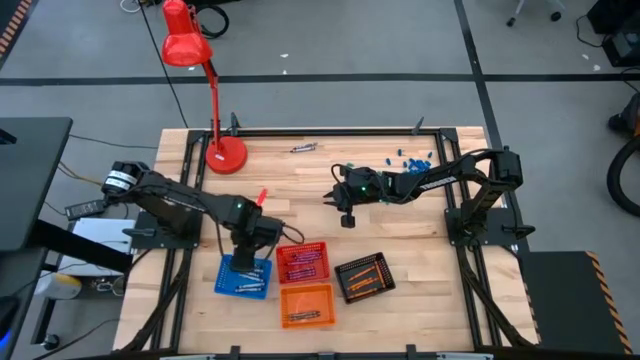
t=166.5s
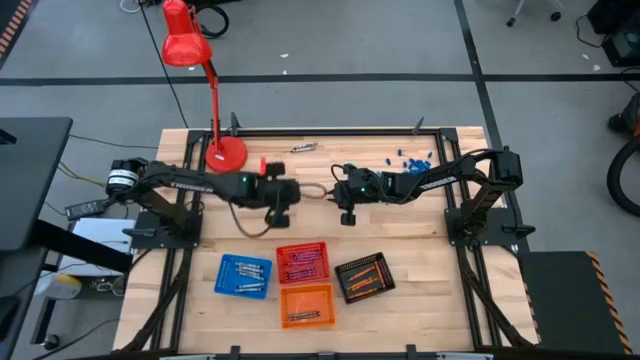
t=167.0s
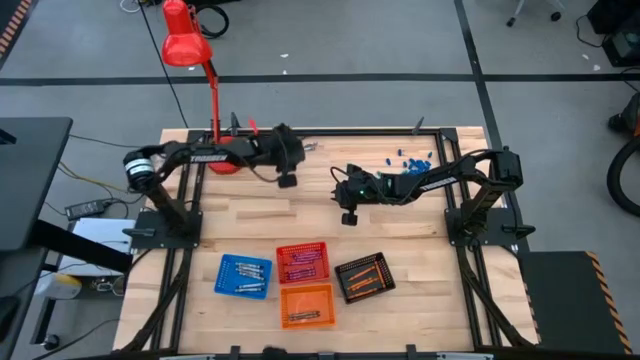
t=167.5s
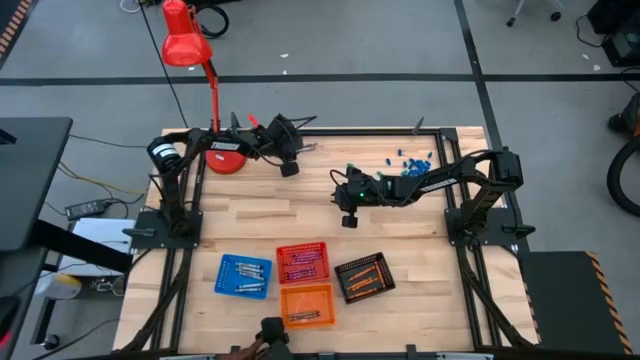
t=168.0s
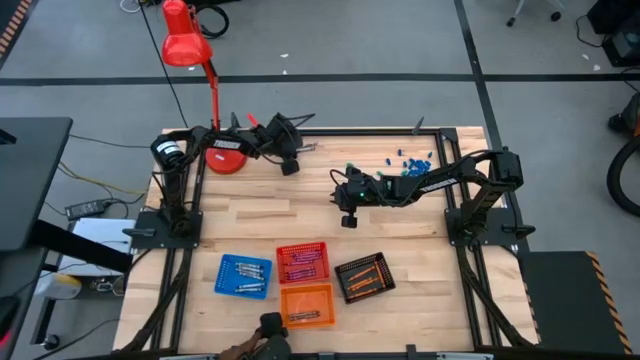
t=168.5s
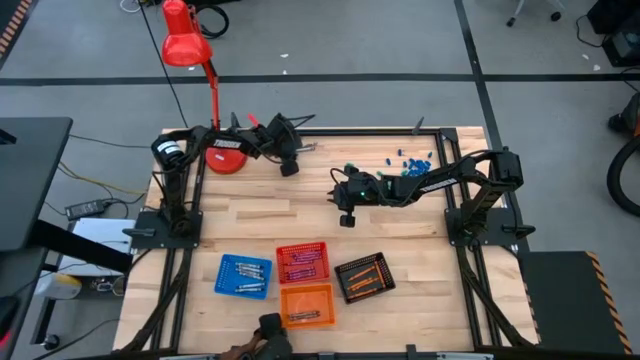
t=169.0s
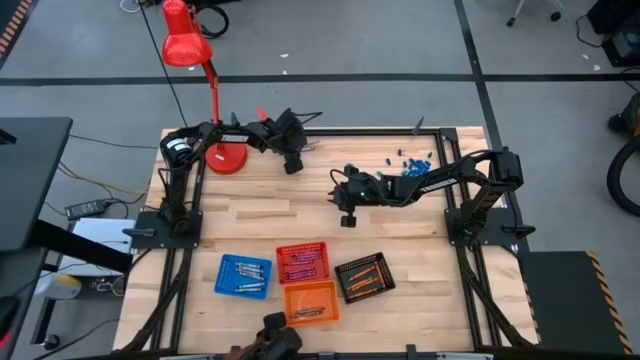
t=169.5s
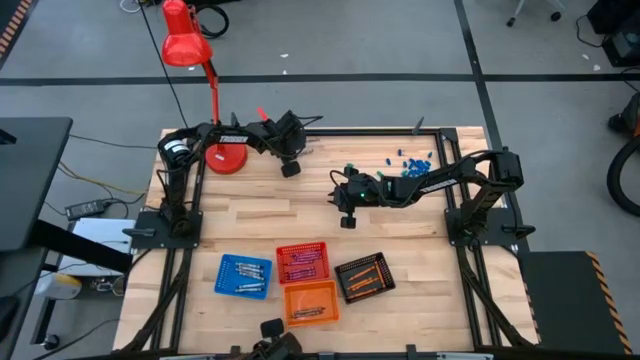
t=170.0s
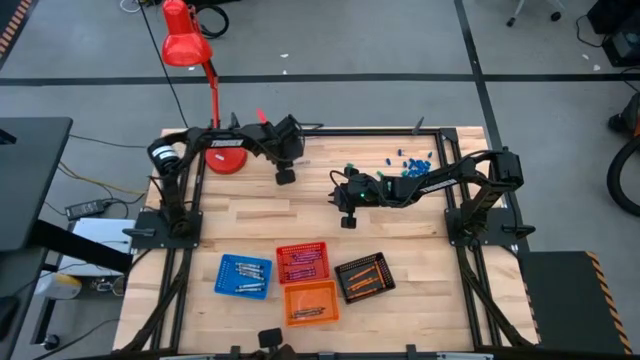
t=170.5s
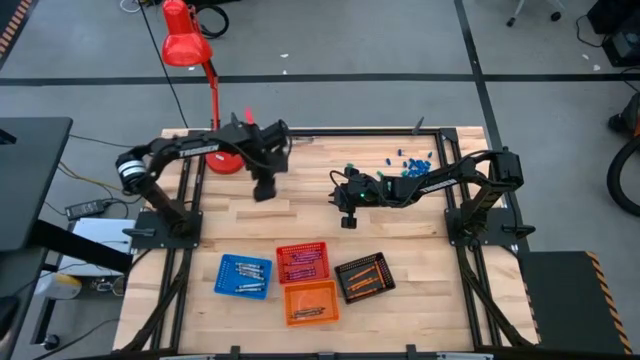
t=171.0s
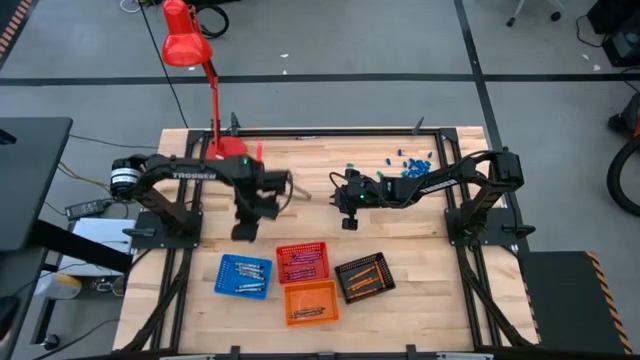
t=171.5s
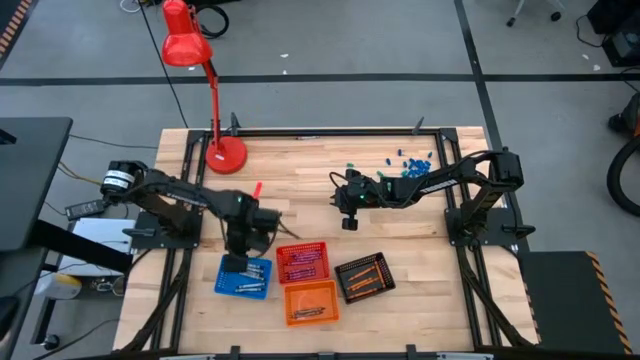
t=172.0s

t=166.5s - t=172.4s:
Task: Sort crayons
Put the black crayon into the blue bin

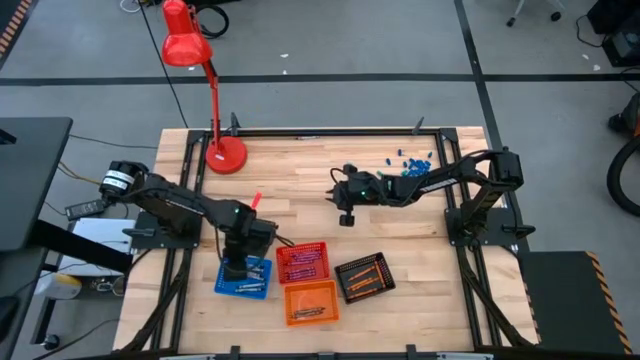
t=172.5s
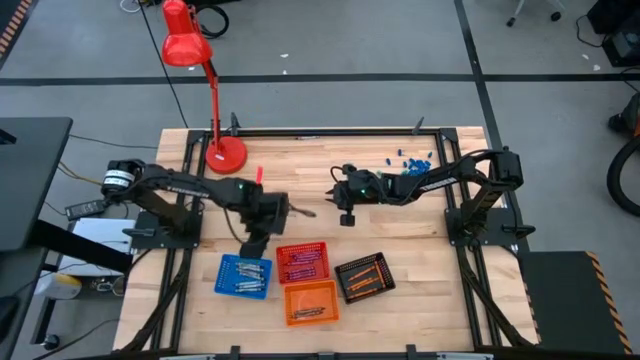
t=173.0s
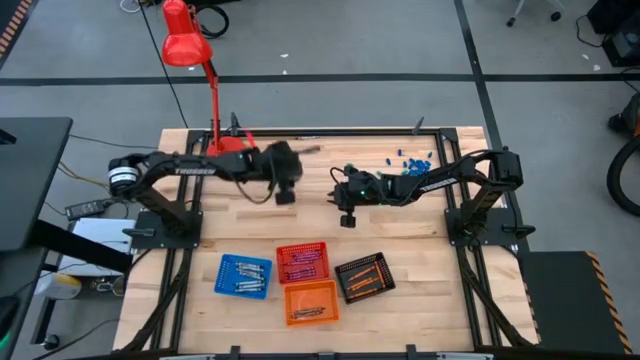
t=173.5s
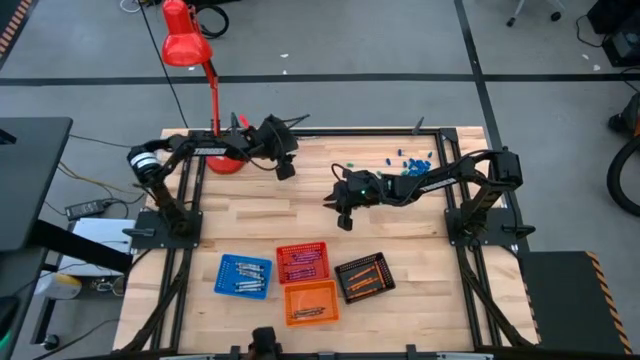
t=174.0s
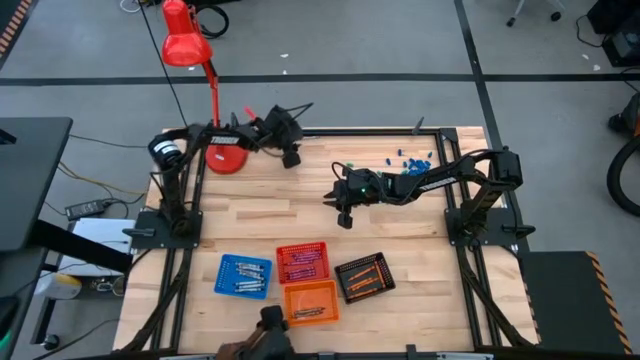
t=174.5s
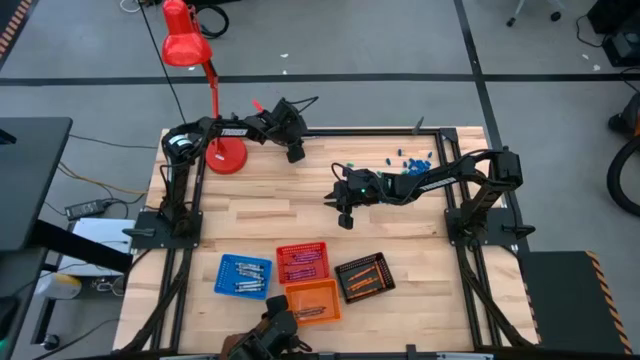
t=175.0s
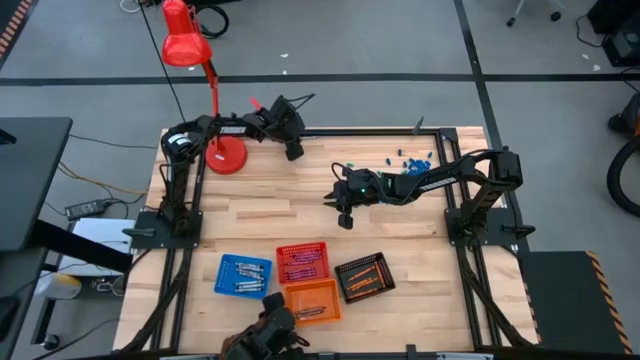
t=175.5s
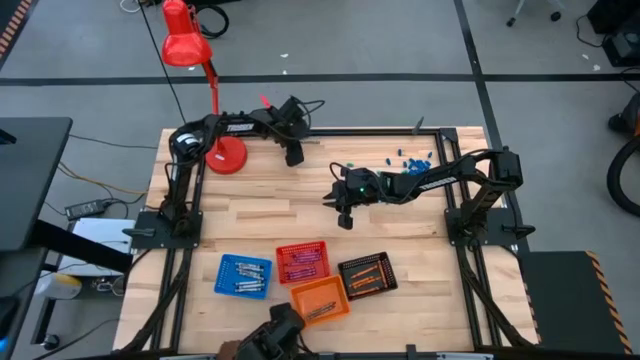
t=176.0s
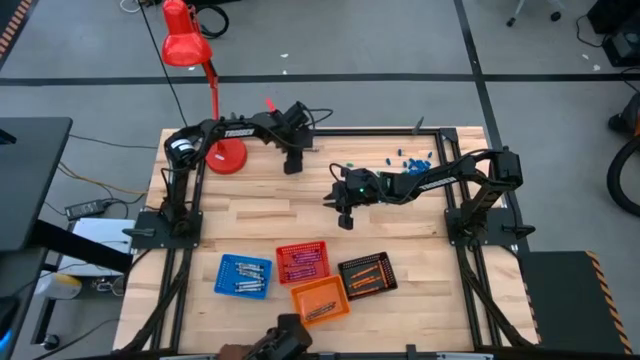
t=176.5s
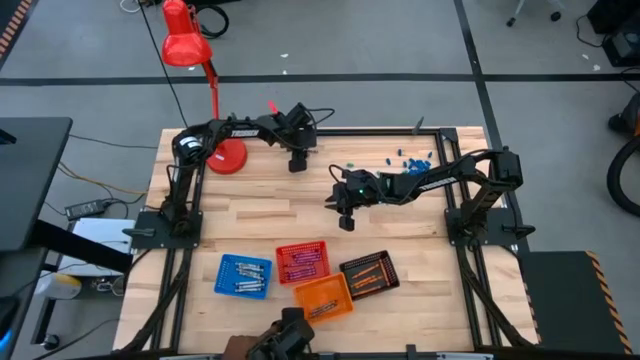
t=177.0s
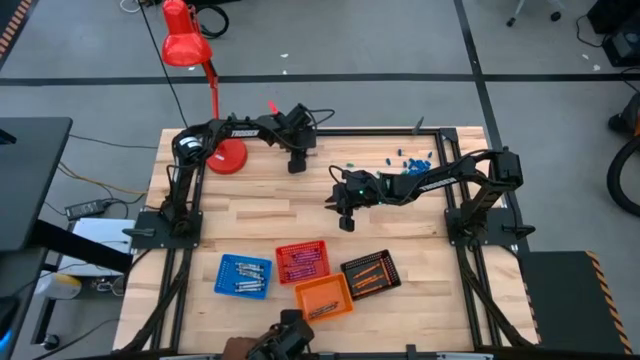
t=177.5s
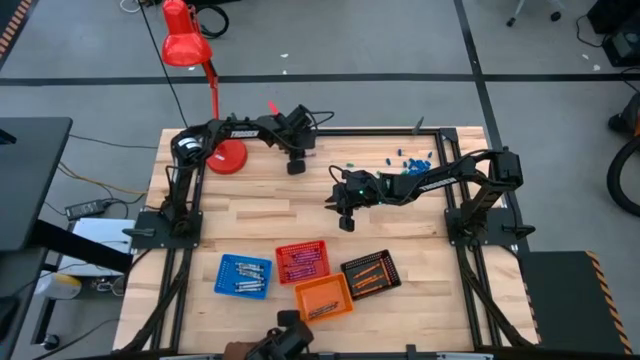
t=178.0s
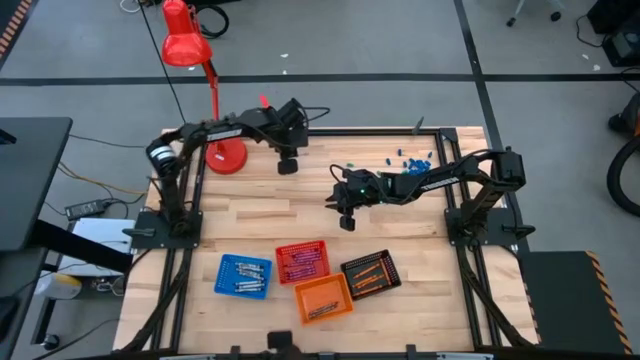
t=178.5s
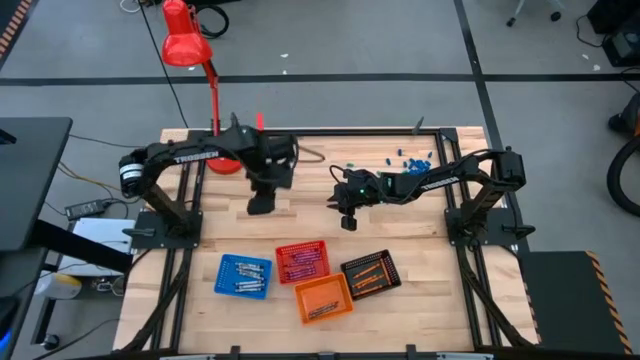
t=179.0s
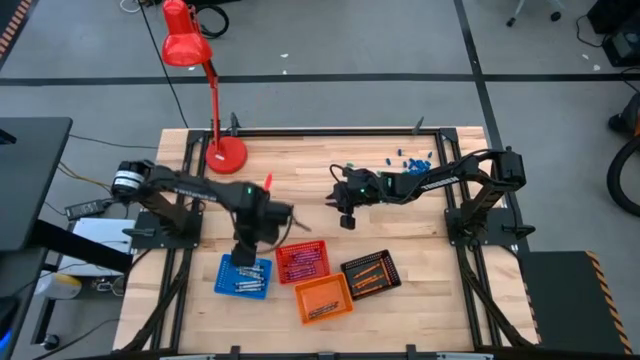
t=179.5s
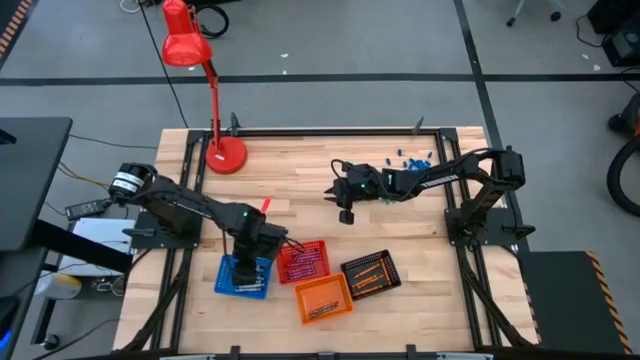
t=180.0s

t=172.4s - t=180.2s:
Put the black crayon into the blue bin

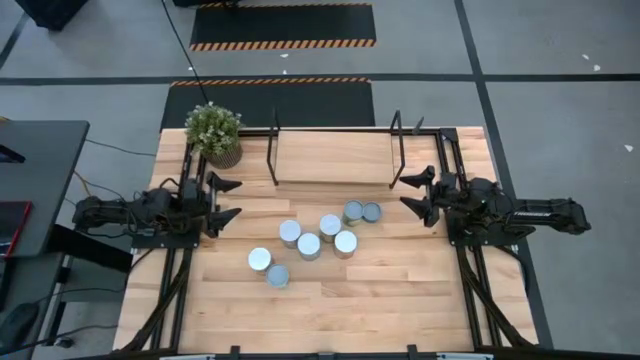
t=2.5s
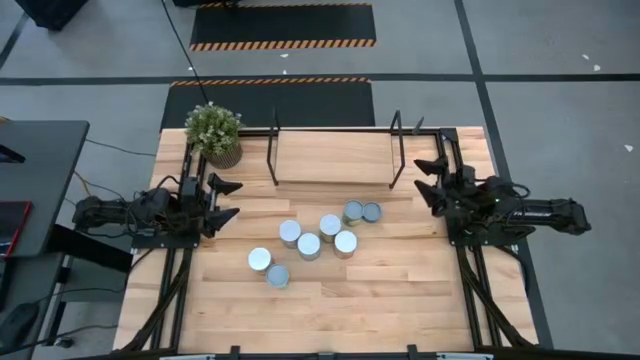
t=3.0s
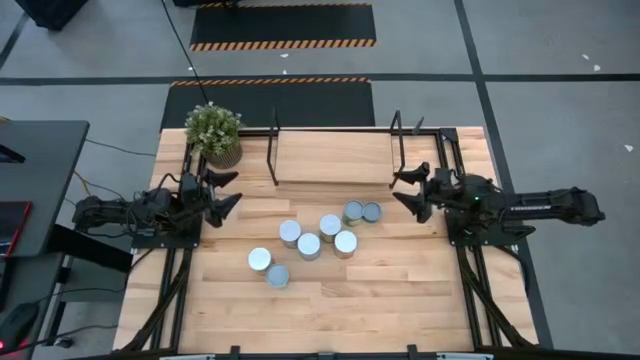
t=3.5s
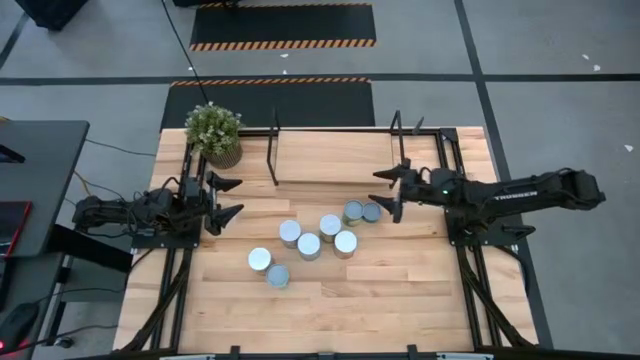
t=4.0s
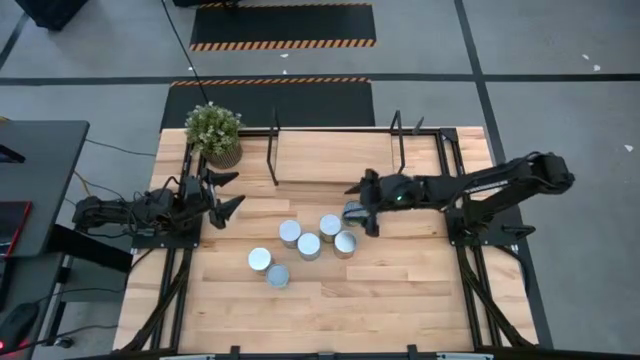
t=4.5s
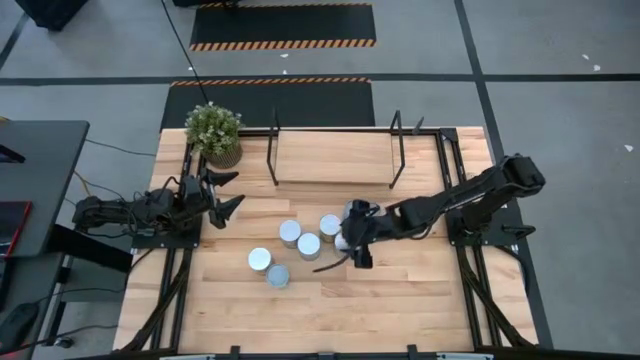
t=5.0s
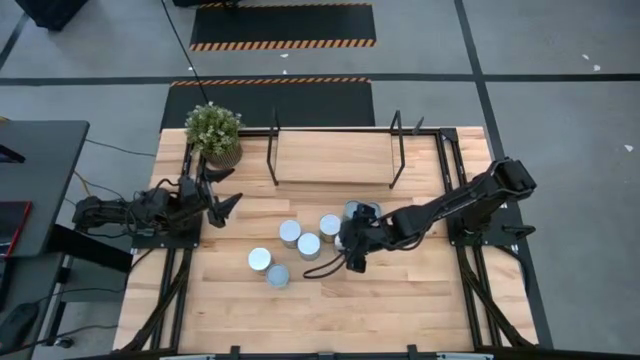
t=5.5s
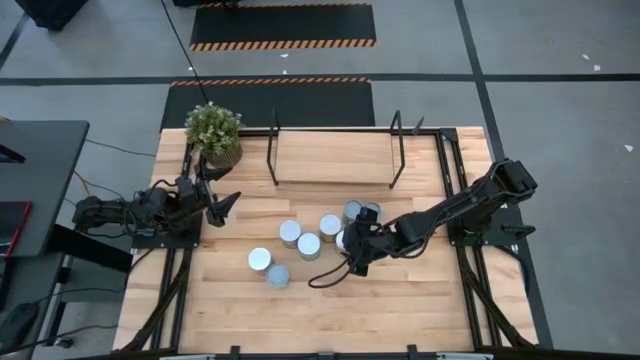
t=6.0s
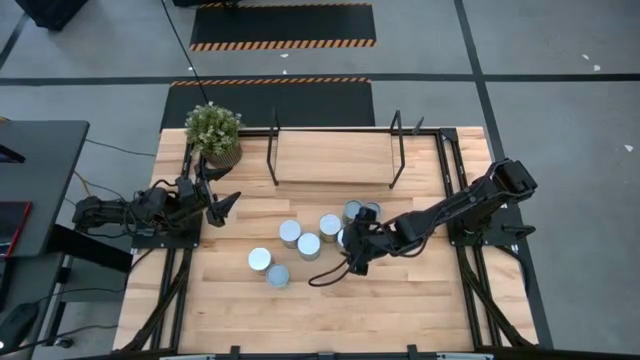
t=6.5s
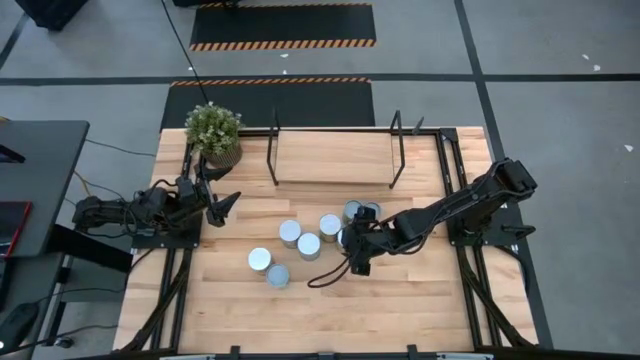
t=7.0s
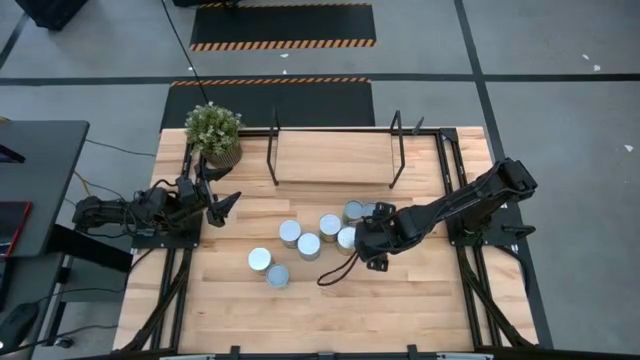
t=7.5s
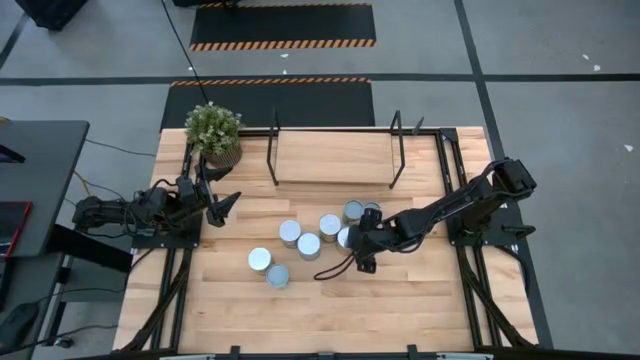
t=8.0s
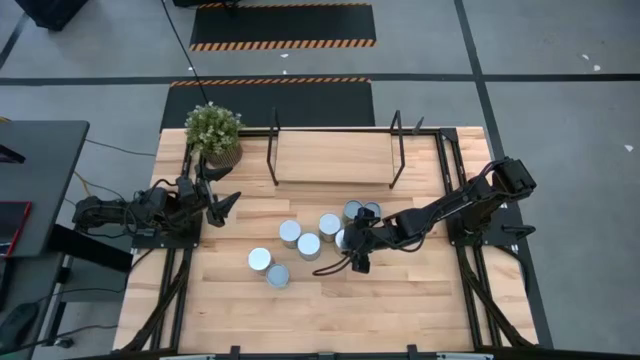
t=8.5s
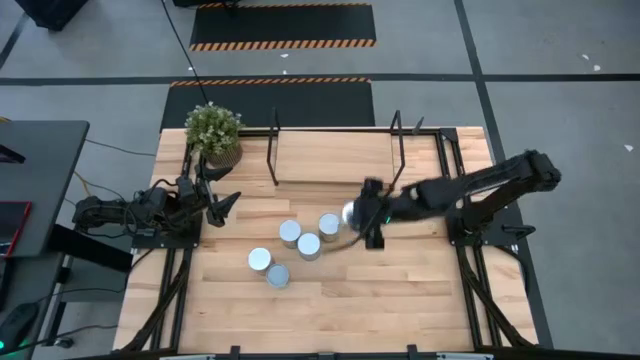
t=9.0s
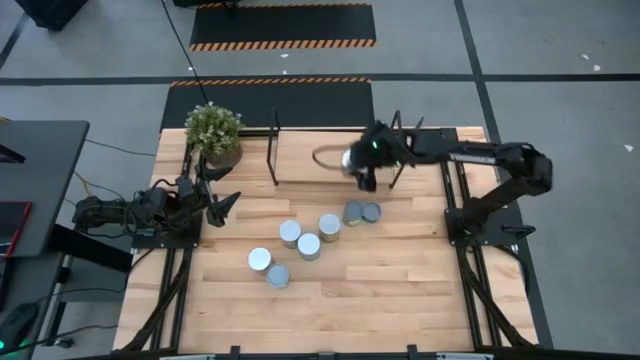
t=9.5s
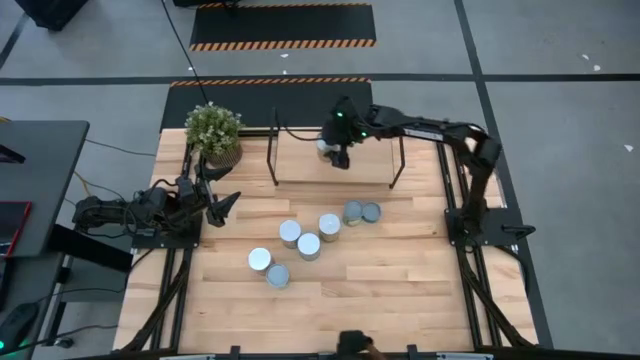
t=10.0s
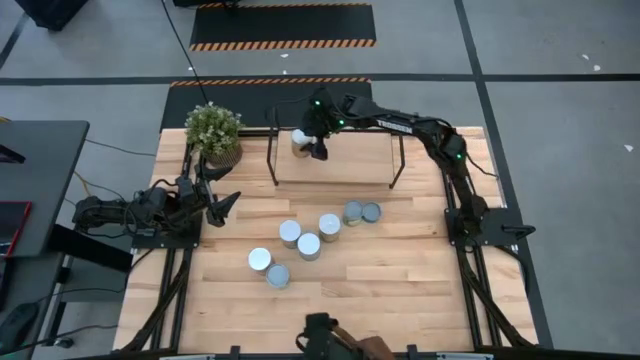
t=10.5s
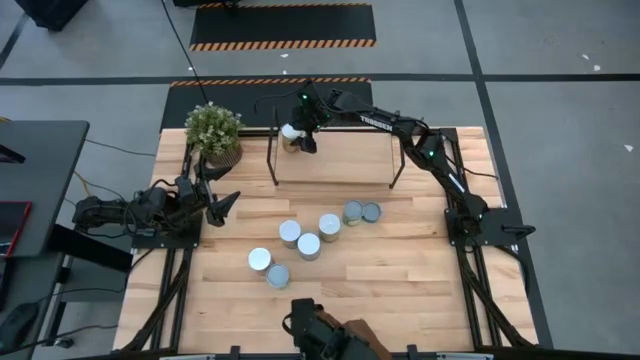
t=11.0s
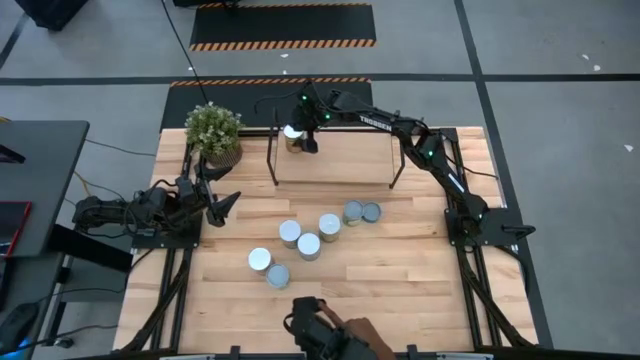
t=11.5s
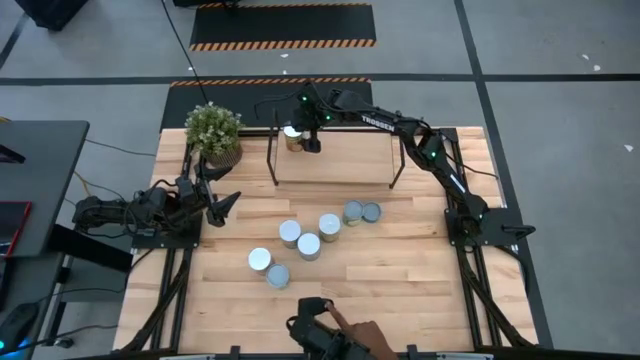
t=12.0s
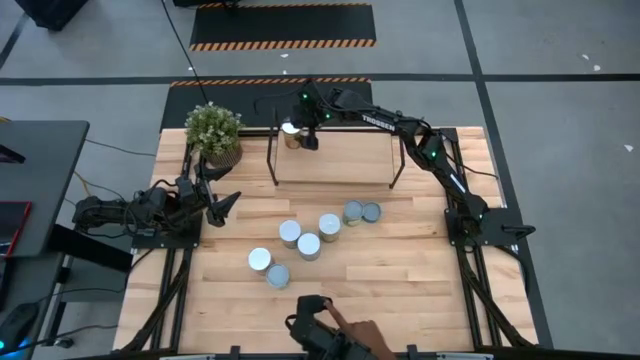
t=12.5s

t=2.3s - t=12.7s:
Task: Pick and place cans onto a shelf
Put the canned pineapple on the shelf
